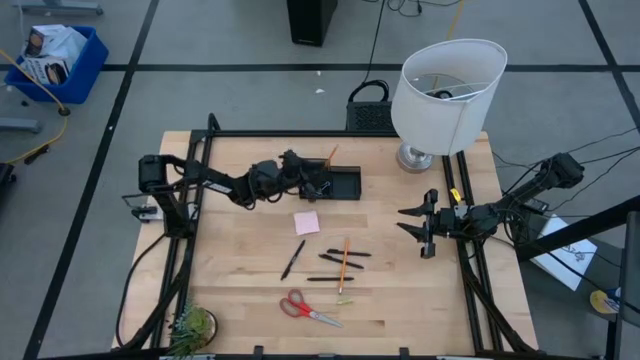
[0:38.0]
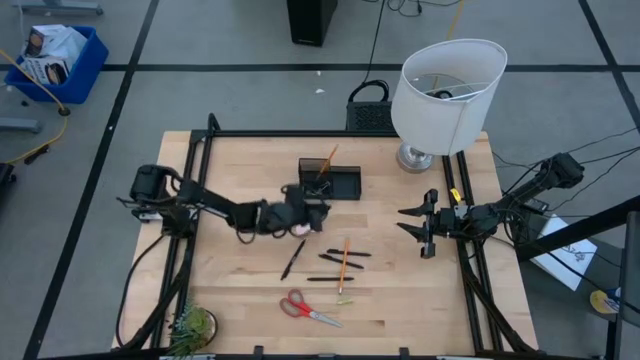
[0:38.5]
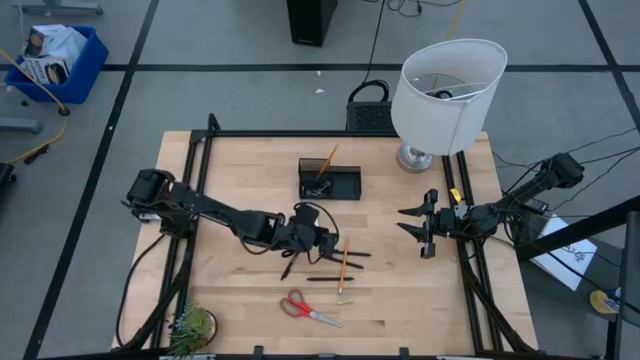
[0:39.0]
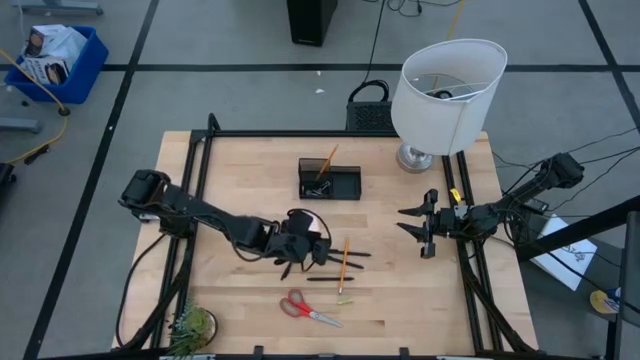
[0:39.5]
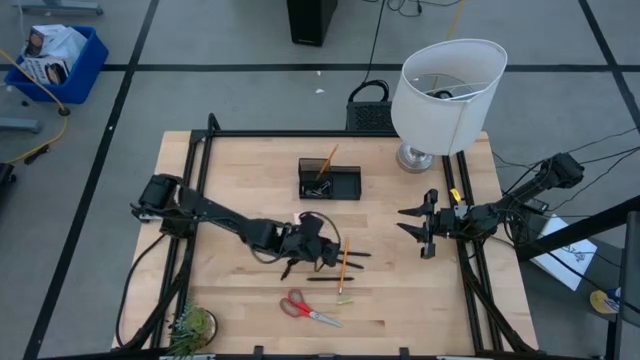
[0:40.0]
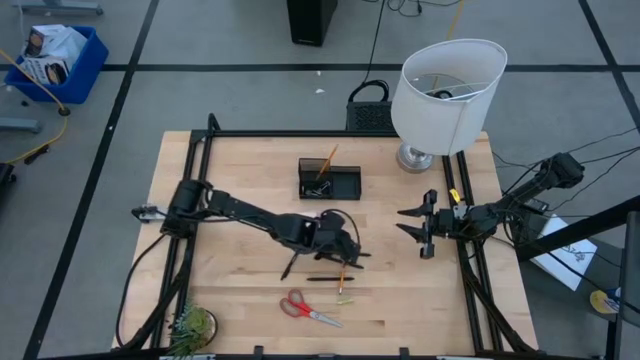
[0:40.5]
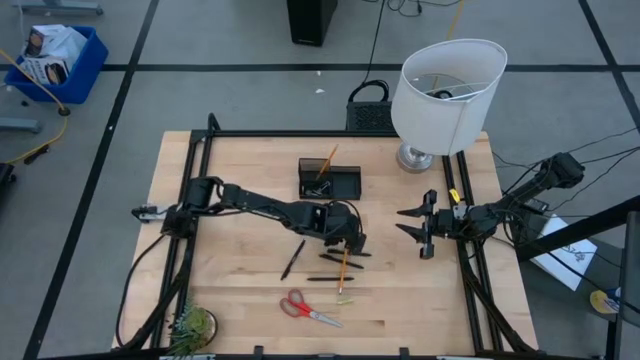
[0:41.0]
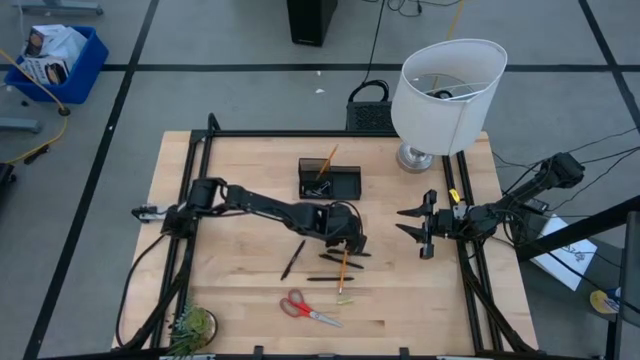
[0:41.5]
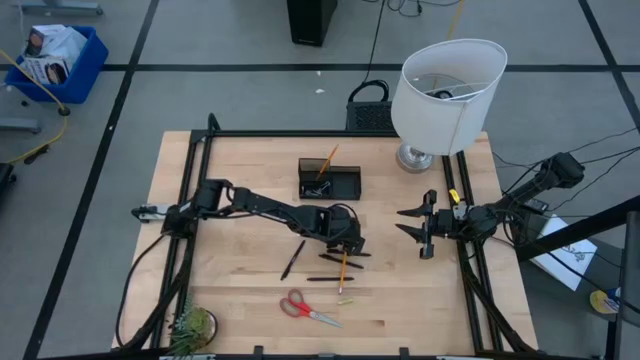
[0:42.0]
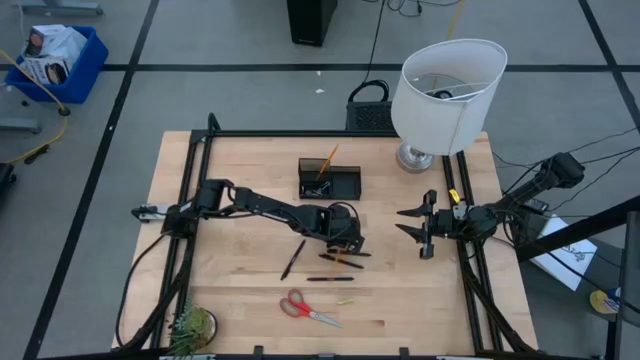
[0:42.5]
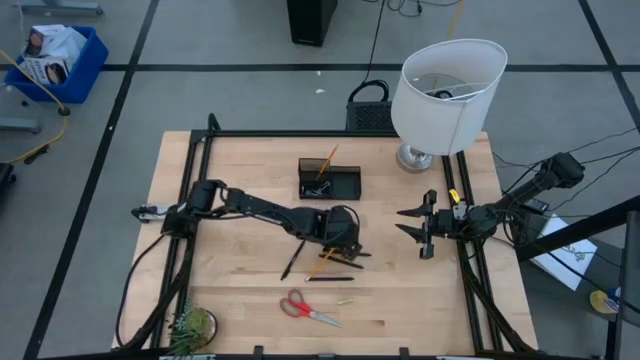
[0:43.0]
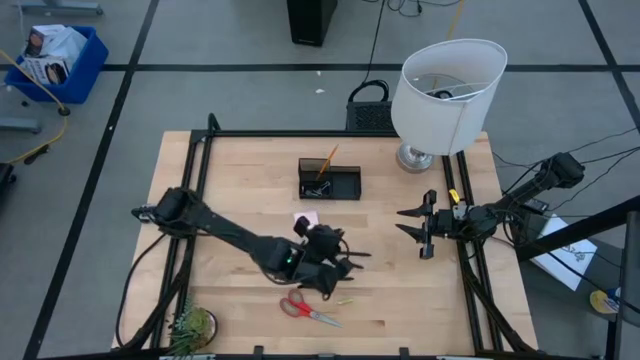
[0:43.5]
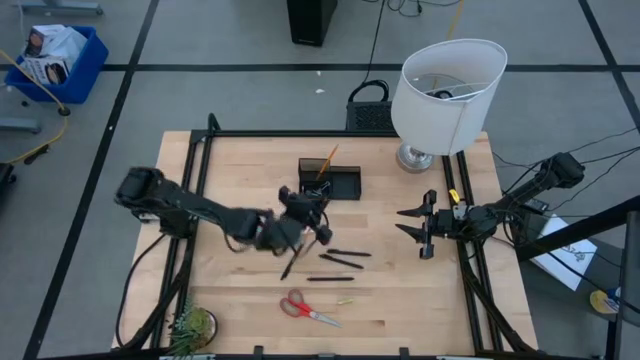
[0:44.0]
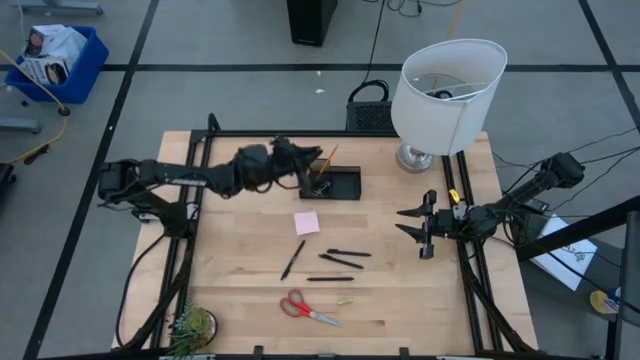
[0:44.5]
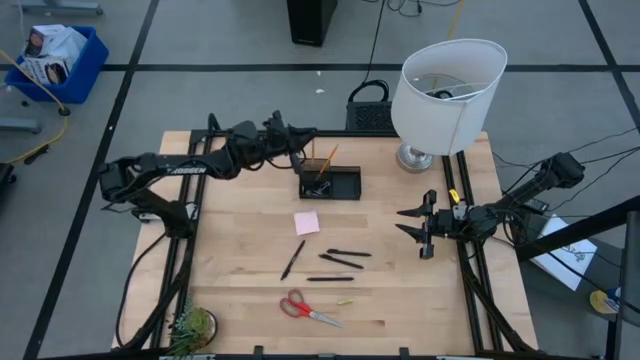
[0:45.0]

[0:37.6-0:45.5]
Task: Pick and place office supplies into organizer
Put the orange pencil into the desk organizer

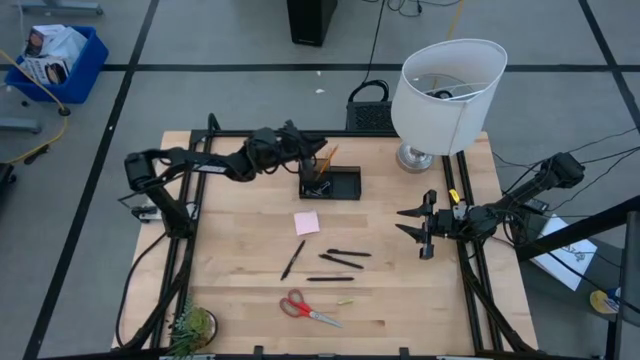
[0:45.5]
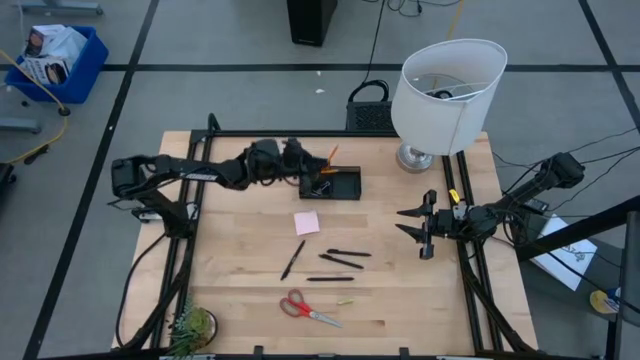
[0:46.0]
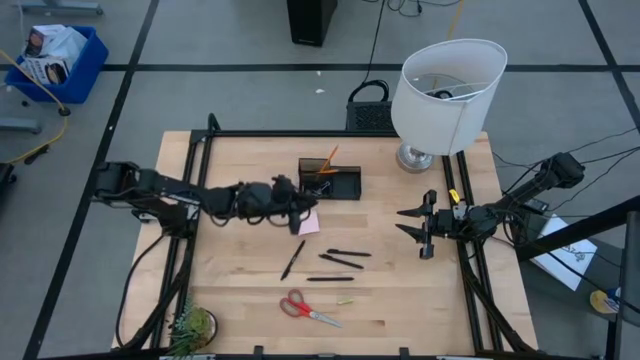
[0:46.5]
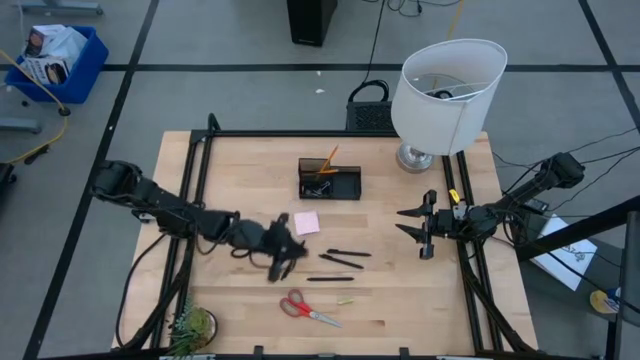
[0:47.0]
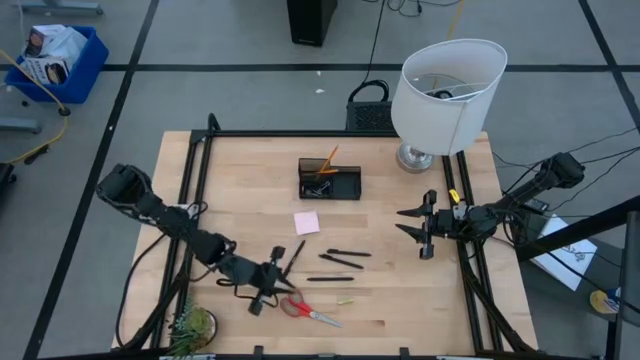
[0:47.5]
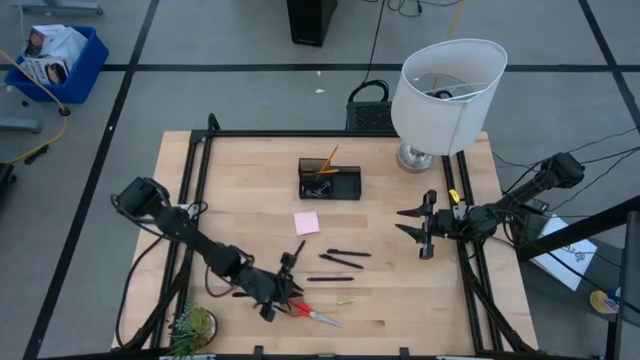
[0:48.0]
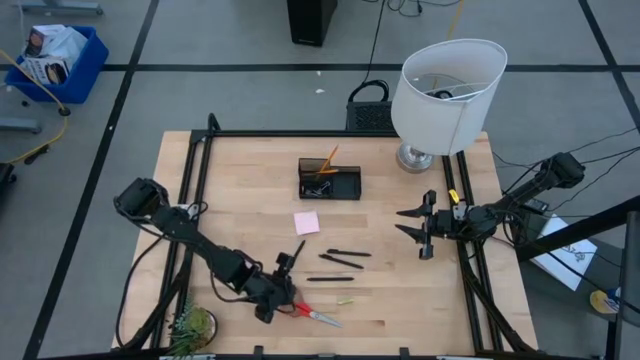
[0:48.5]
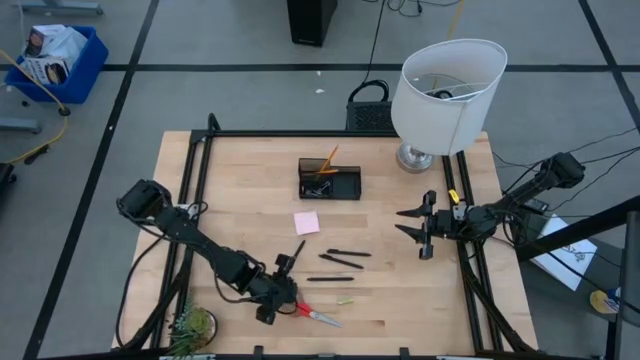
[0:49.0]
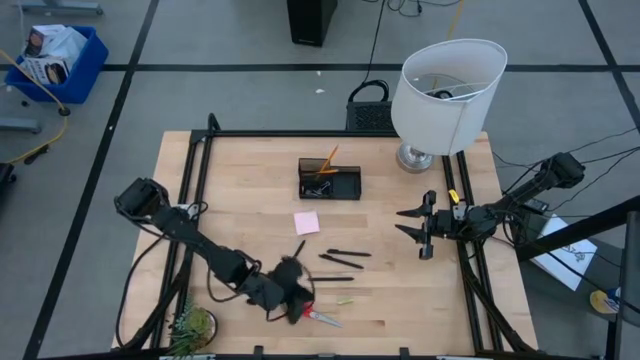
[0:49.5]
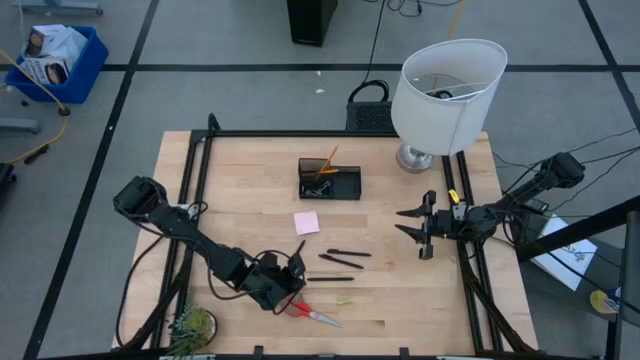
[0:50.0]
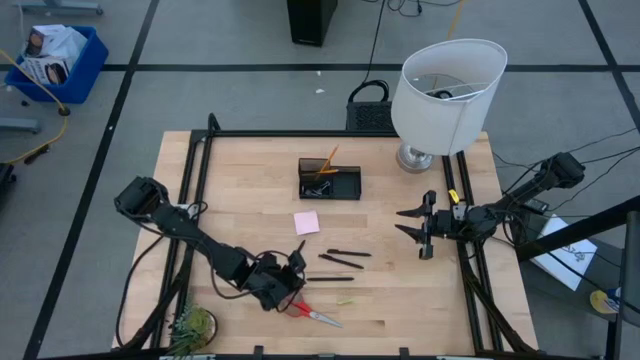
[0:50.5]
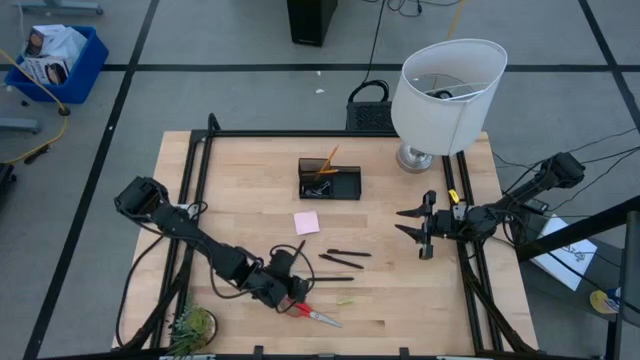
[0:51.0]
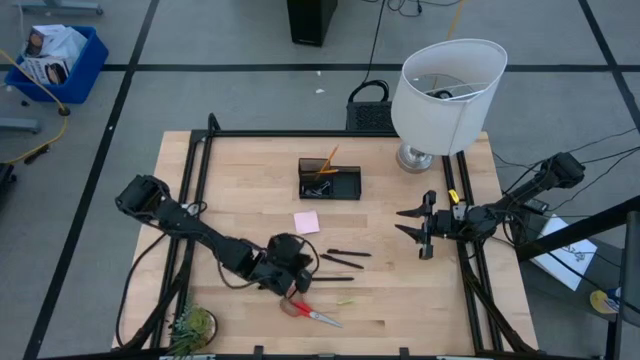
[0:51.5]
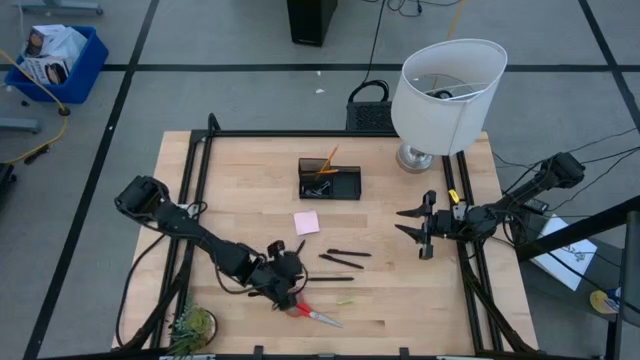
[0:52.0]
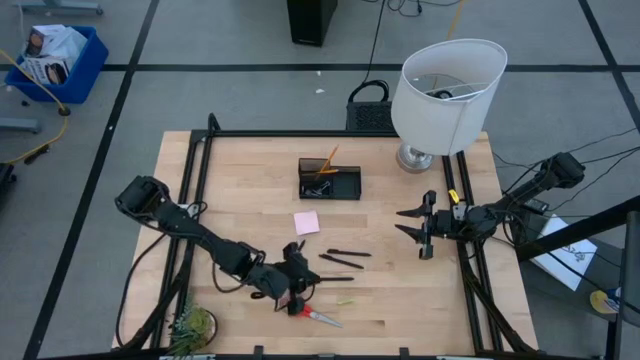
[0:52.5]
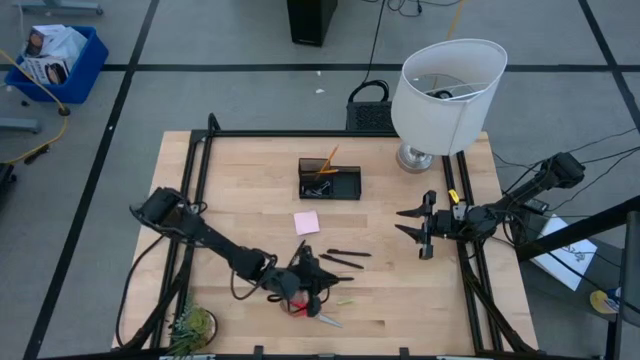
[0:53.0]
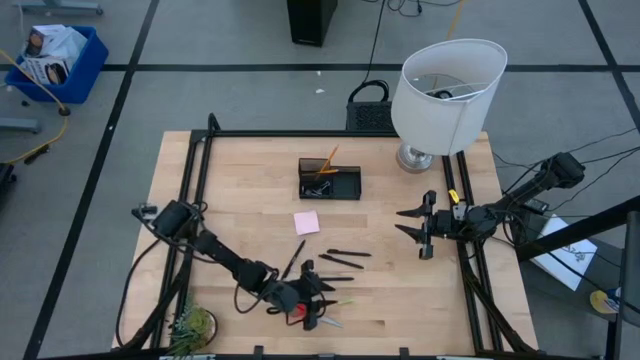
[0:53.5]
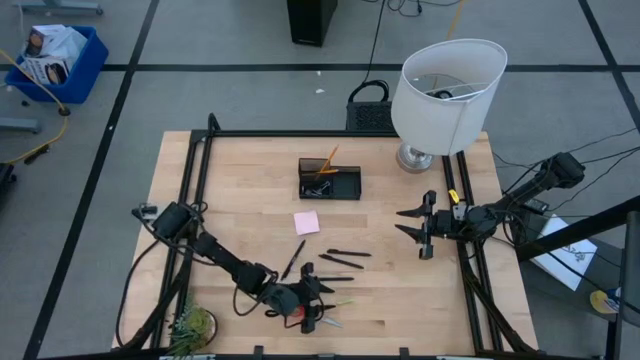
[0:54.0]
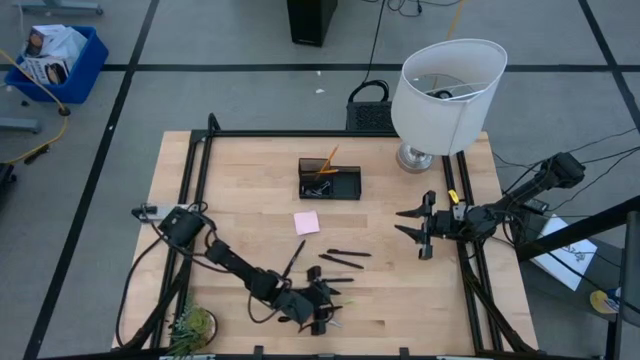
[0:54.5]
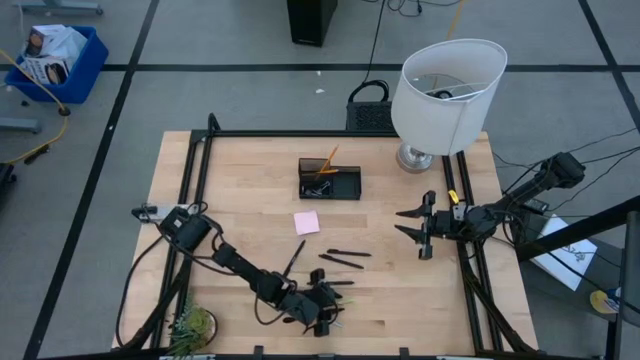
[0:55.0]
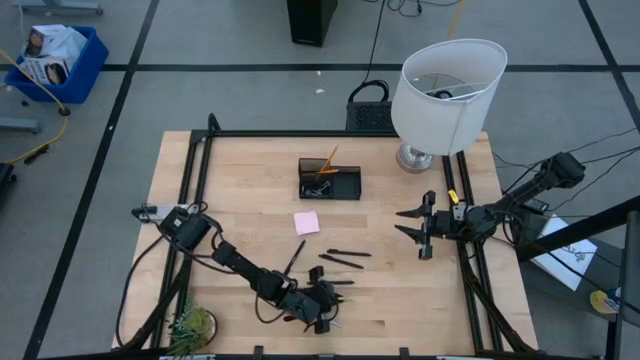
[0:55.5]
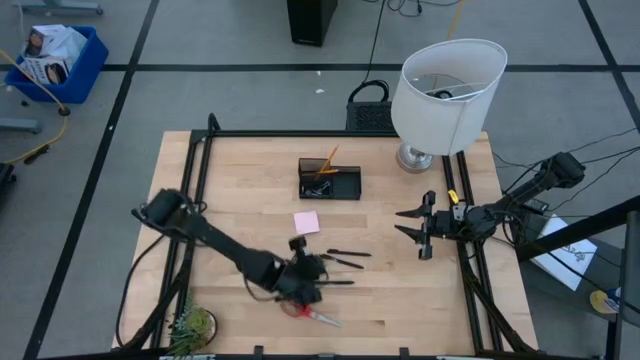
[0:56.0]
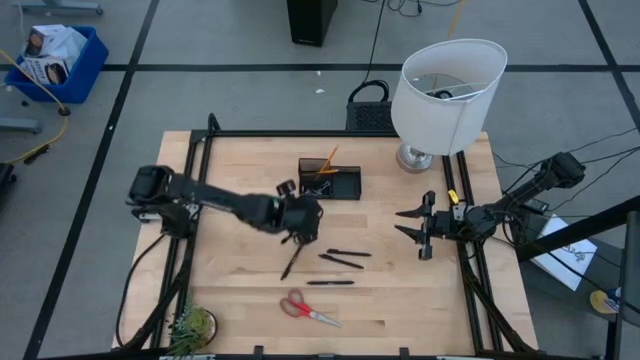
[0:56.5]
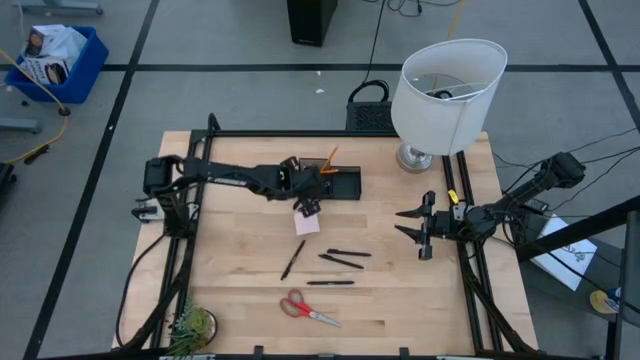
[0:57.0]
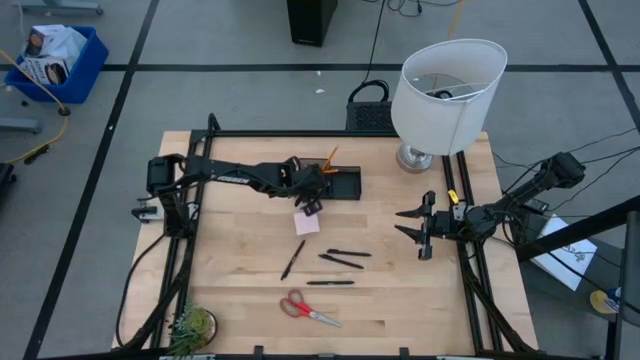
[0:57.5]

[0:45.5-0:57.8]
Put the green eraser into the desk organizer
